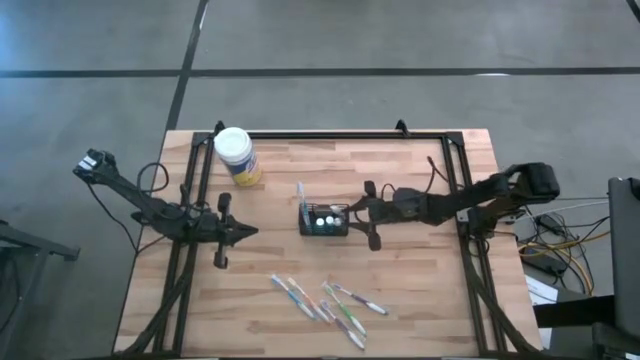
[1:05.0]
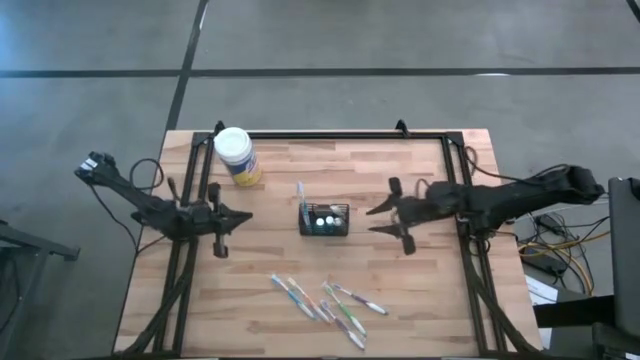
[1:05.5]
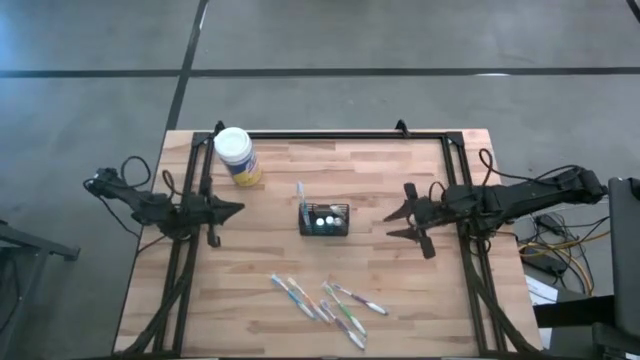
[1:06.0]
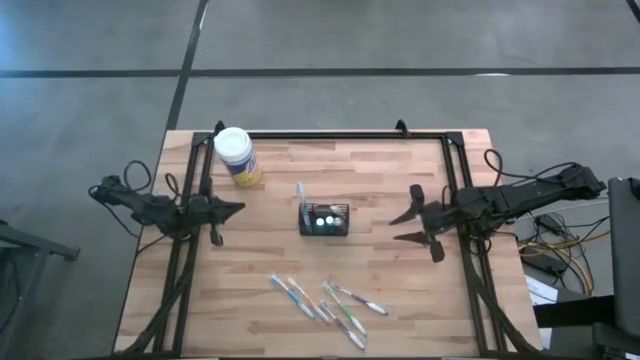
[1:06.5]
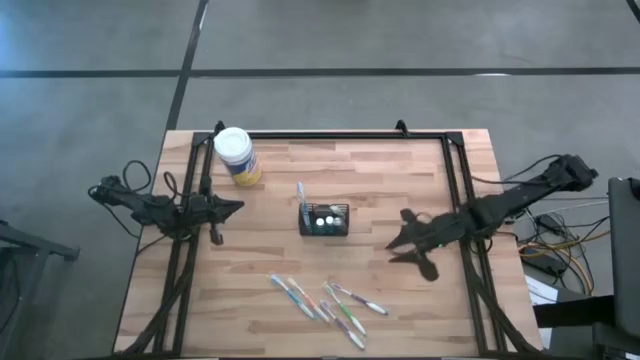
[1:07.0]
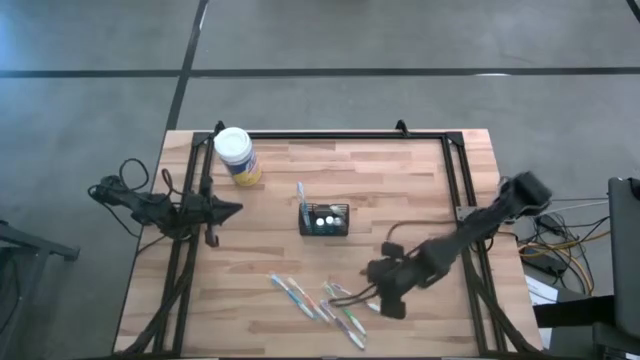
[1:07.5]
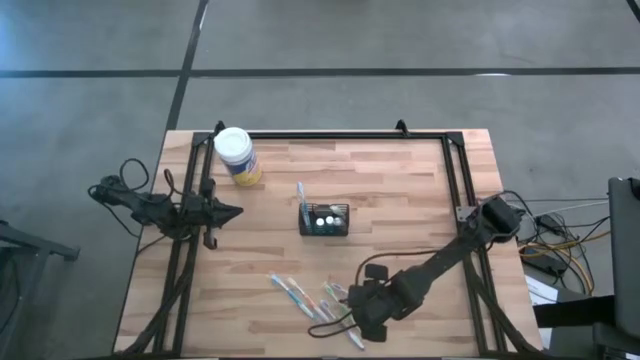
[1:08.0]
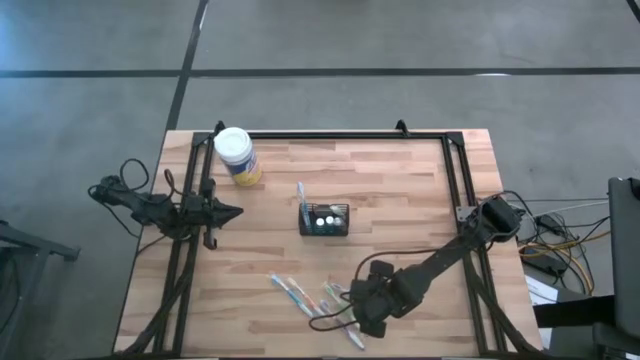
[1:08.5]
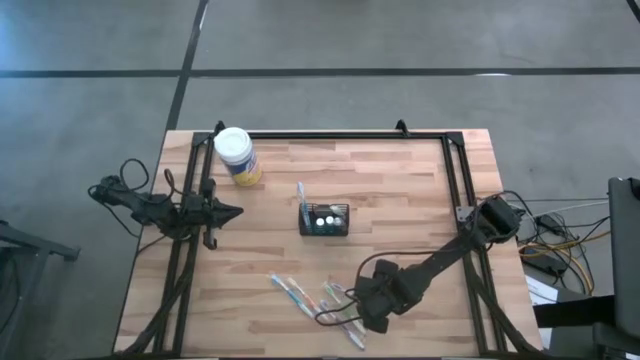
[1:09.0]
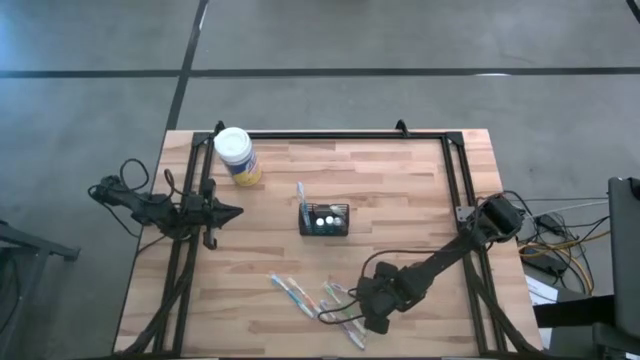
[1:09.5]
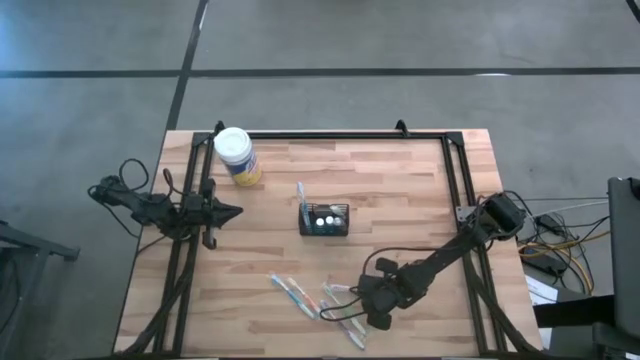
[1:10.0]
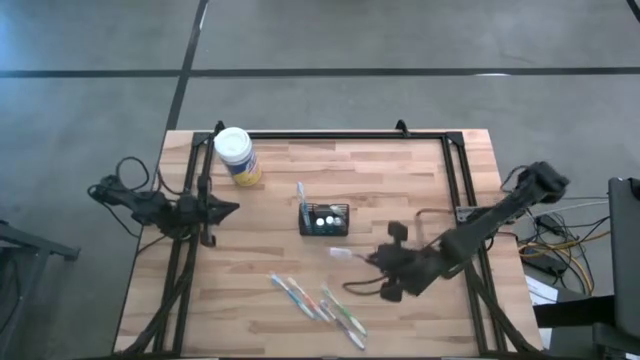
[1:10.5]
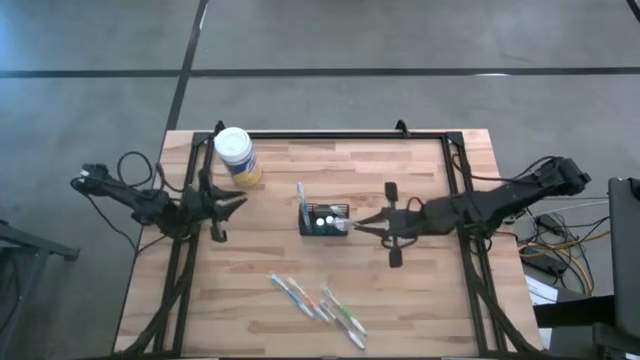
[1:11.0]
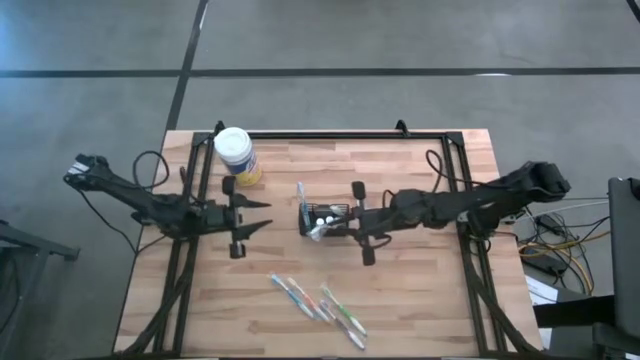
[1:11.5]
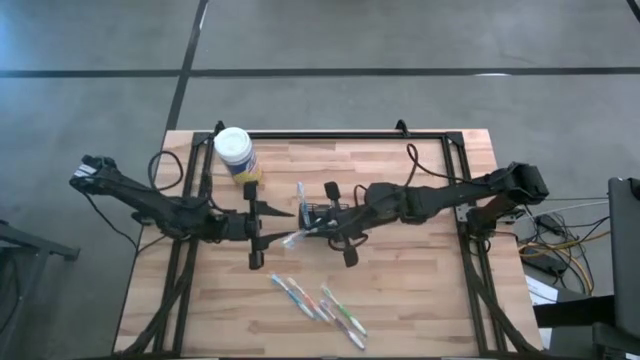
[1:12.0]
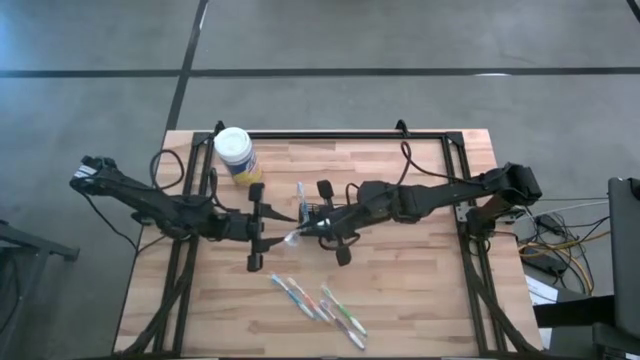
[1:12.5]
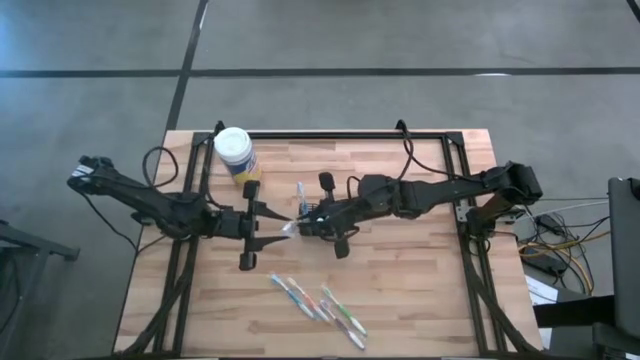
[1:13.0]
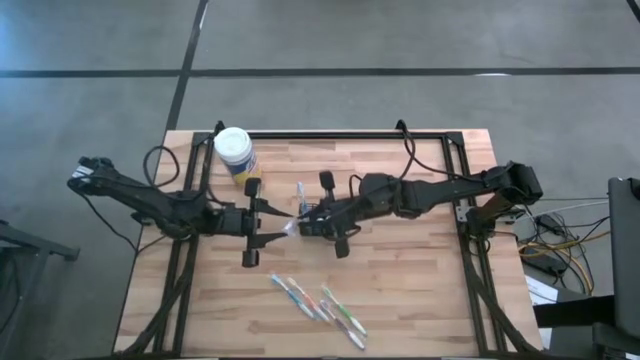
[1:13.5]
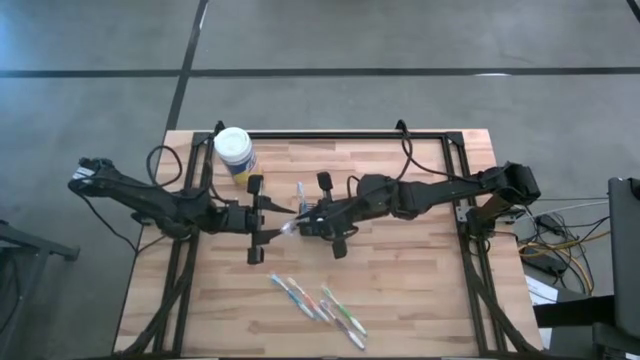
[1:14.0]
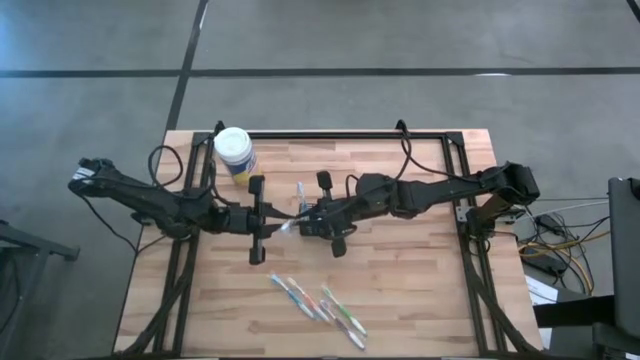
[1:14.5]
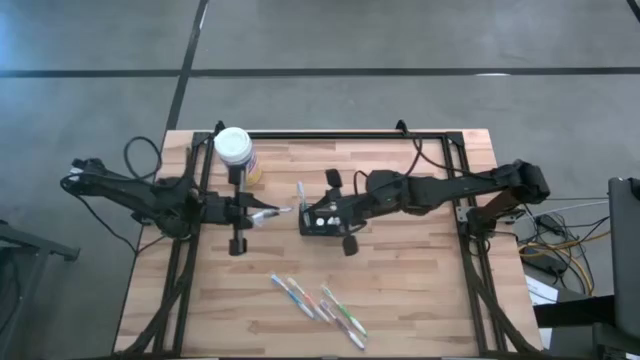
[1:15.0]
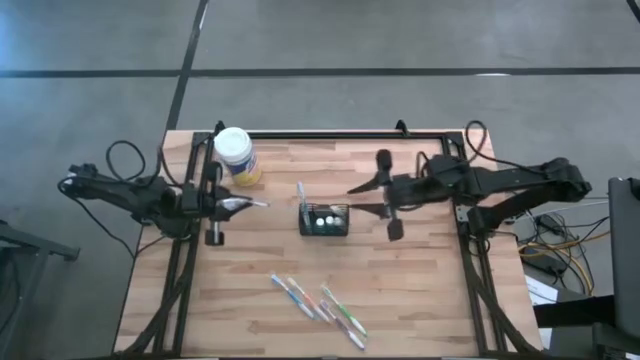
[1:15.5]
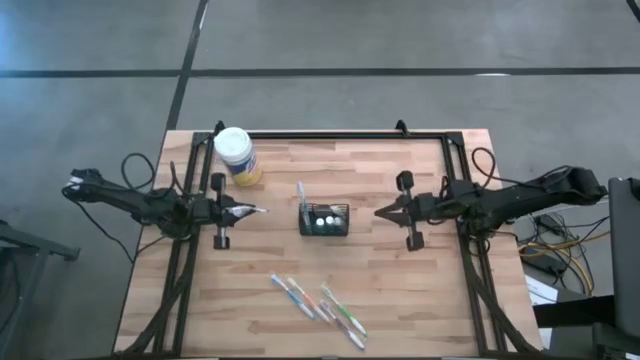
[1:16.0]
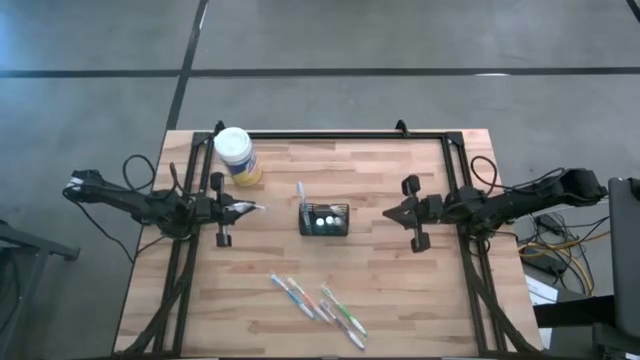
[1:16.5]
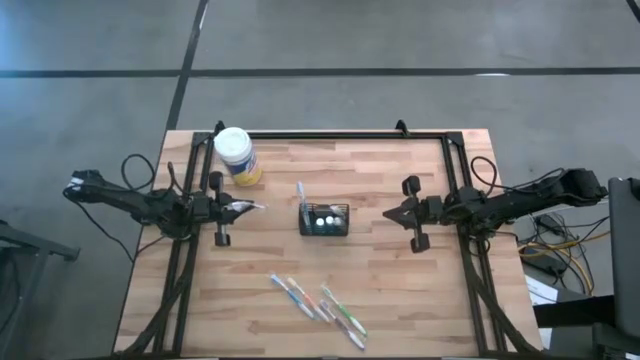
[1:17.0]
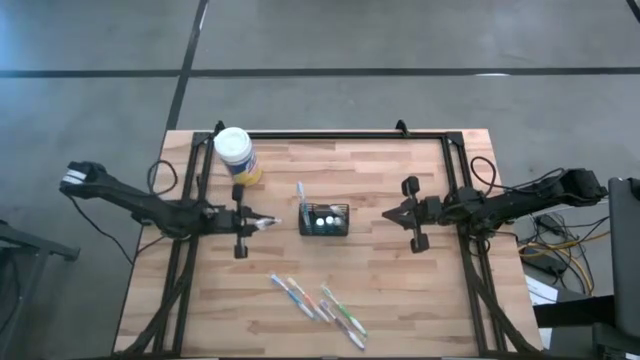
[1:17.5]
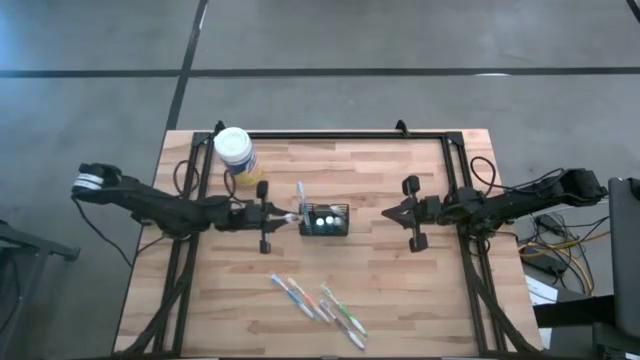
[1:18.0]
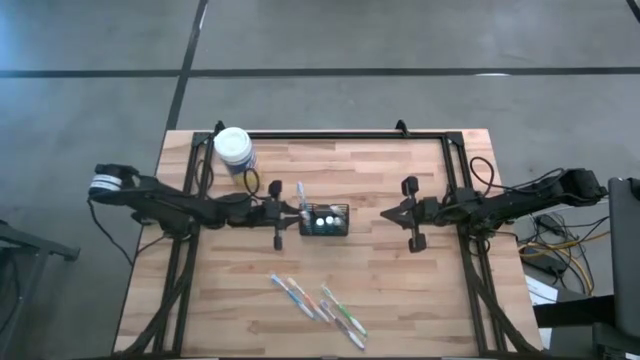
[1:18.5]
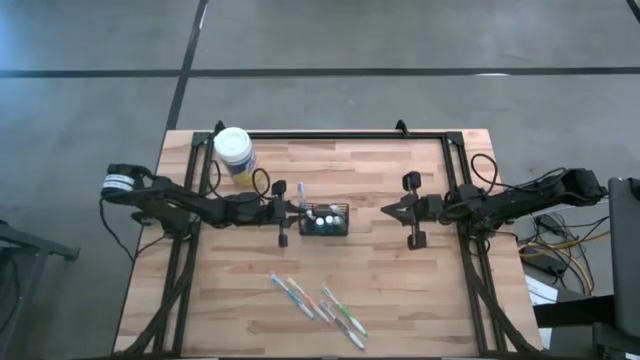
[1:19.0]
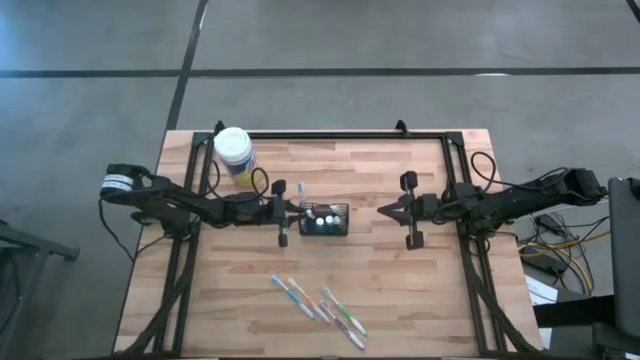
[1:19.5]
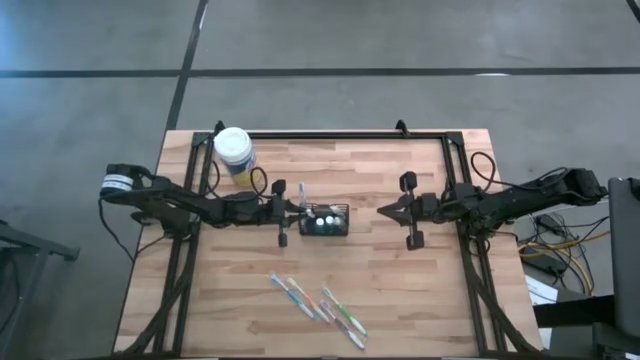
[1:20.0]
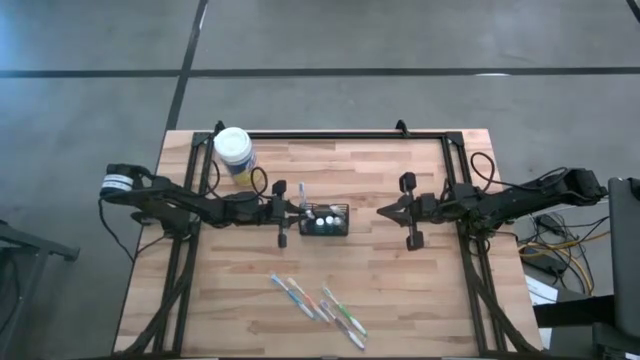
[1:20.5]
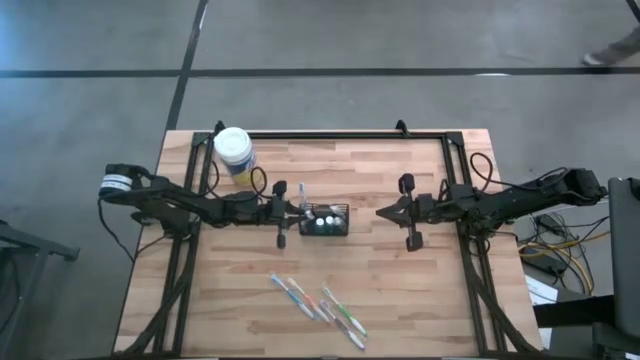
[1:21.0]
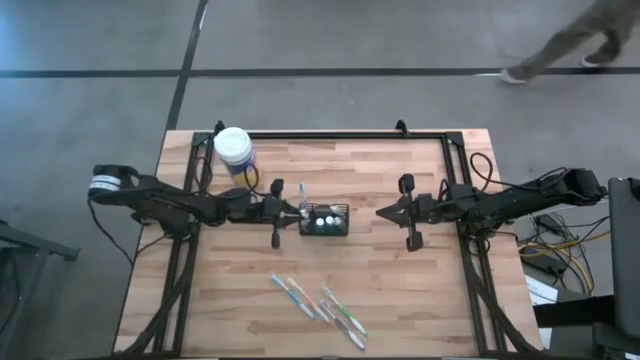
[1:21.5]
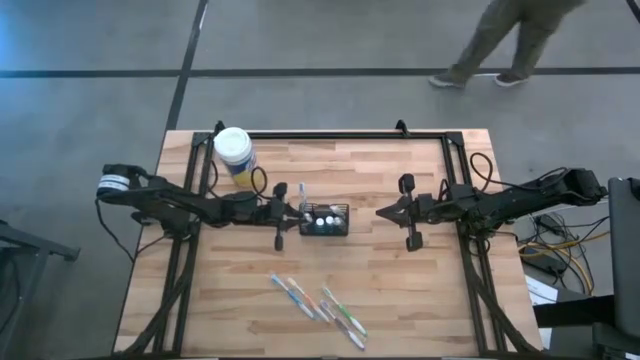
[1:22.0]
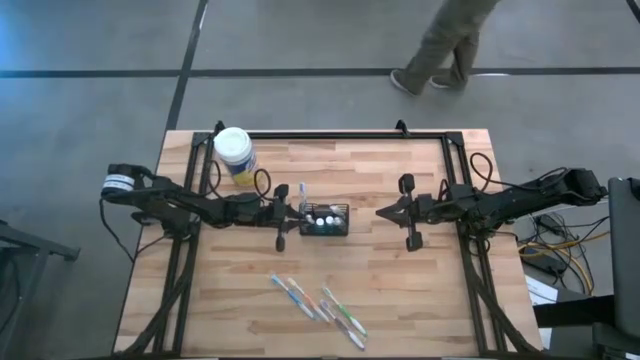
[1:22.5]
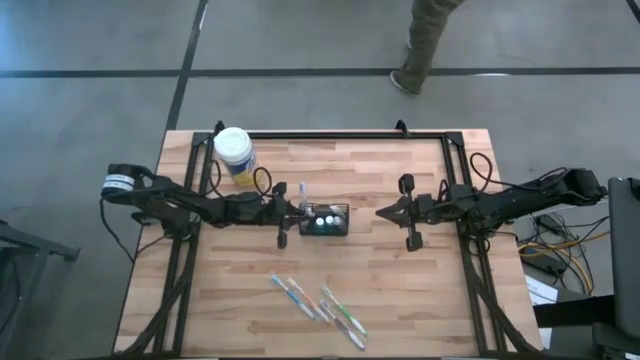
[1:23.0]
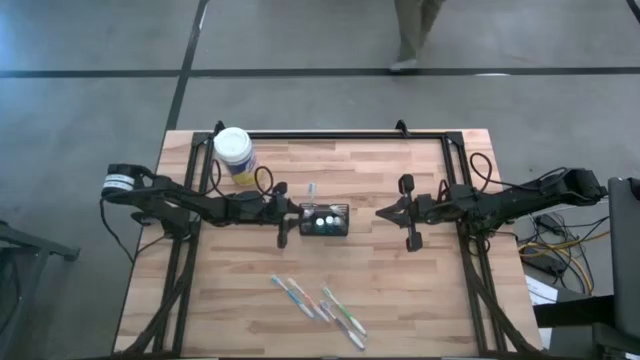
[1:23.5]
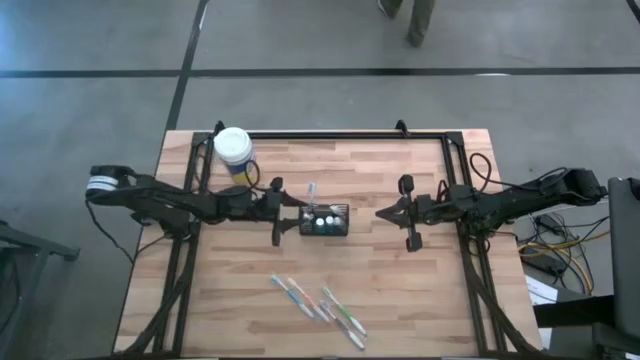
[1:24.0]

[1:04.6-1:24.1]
Task: Pick & Place toothbrushing station
Put the right purple toothbrush into the wire organizer
